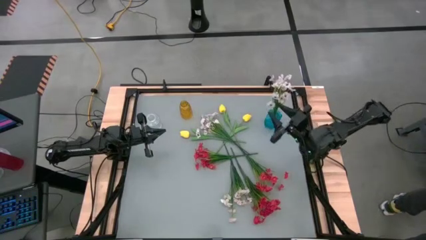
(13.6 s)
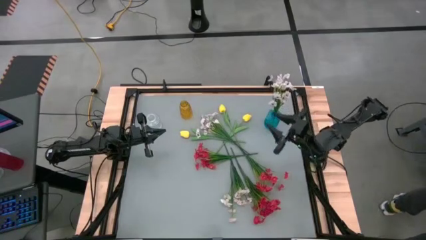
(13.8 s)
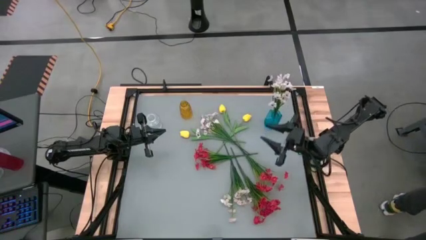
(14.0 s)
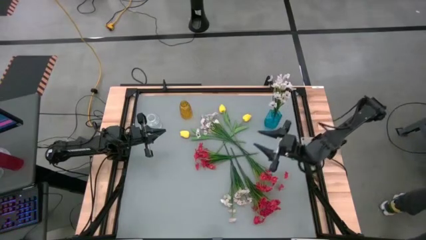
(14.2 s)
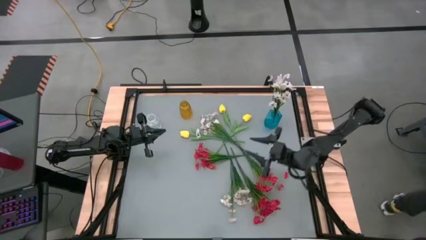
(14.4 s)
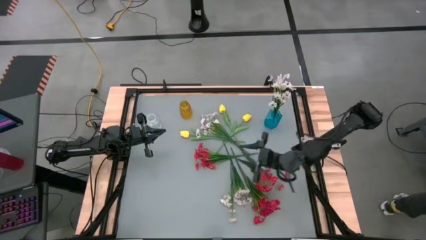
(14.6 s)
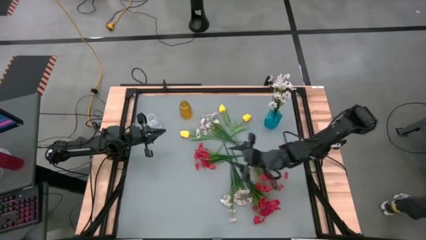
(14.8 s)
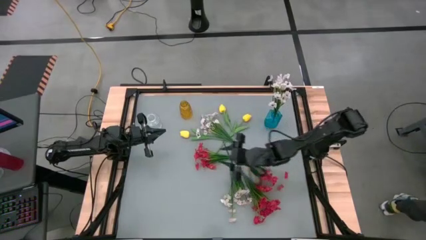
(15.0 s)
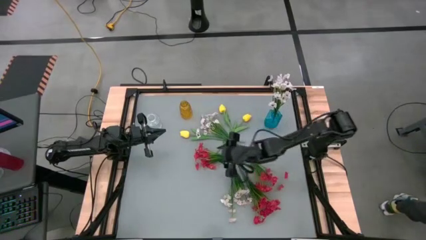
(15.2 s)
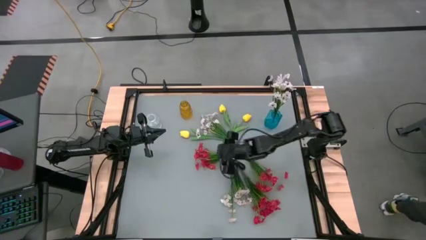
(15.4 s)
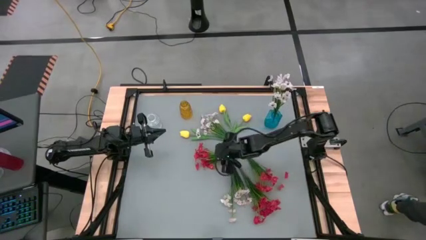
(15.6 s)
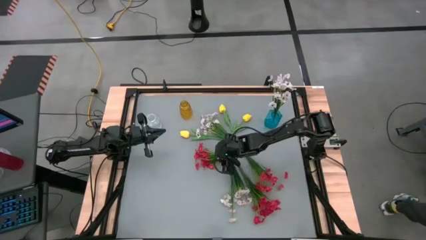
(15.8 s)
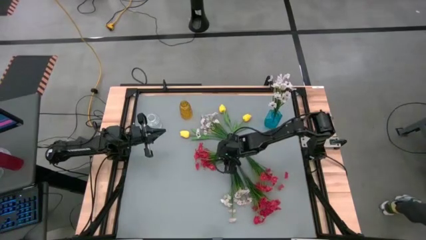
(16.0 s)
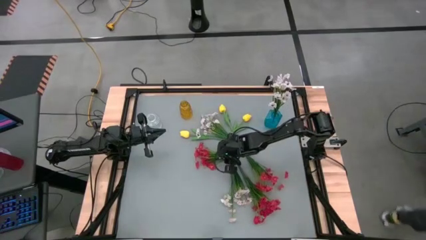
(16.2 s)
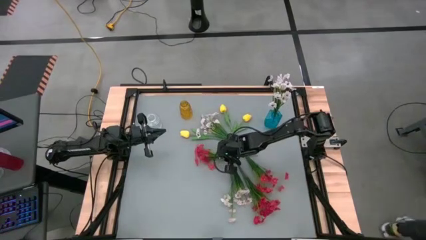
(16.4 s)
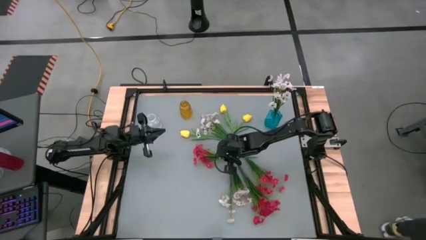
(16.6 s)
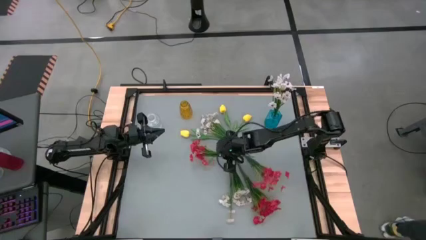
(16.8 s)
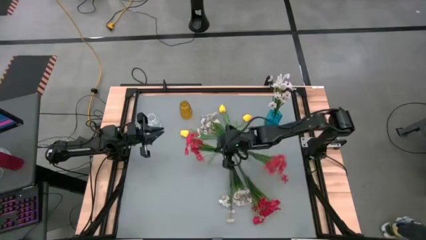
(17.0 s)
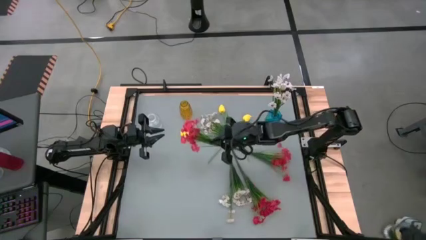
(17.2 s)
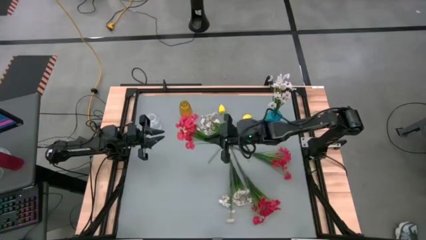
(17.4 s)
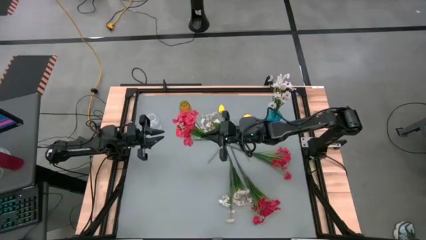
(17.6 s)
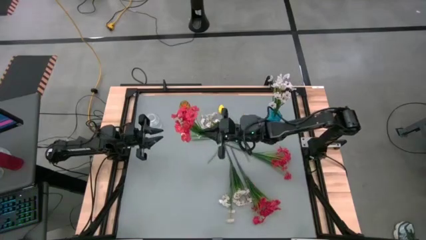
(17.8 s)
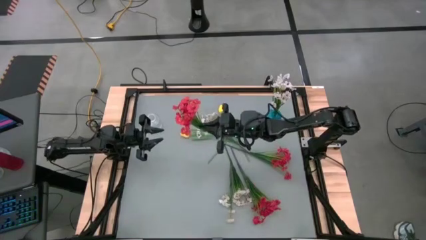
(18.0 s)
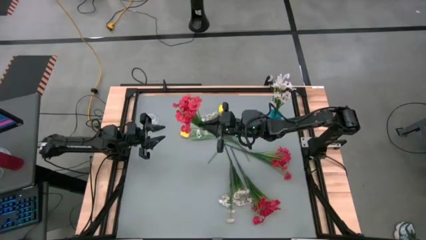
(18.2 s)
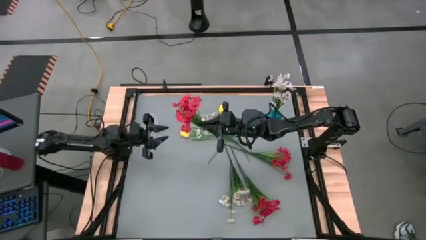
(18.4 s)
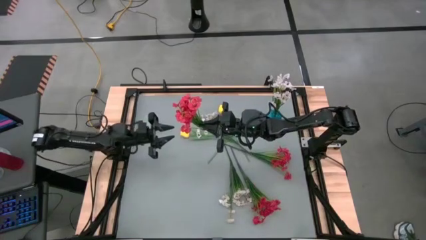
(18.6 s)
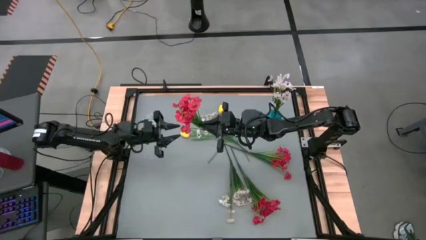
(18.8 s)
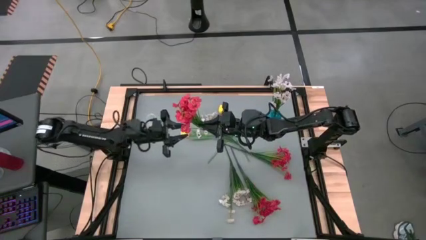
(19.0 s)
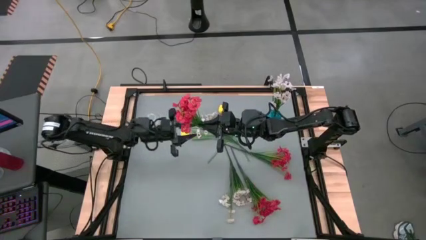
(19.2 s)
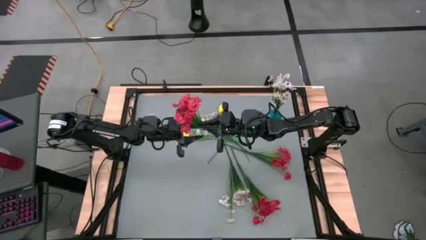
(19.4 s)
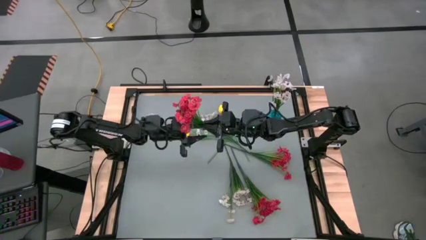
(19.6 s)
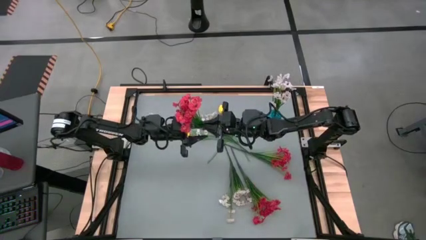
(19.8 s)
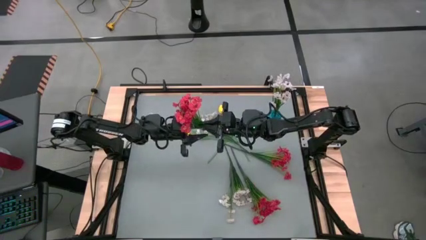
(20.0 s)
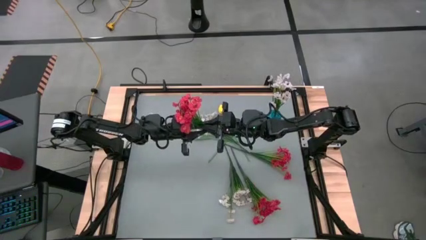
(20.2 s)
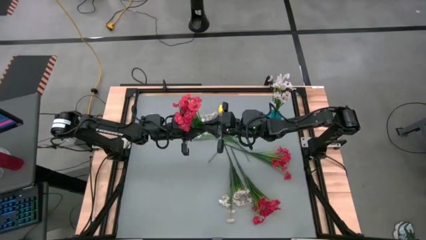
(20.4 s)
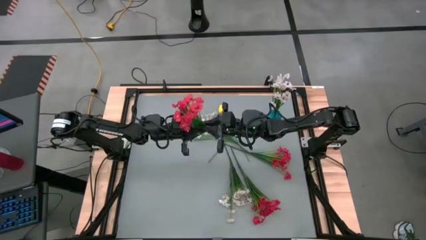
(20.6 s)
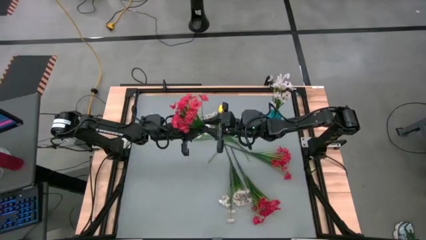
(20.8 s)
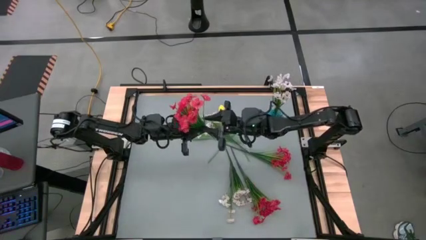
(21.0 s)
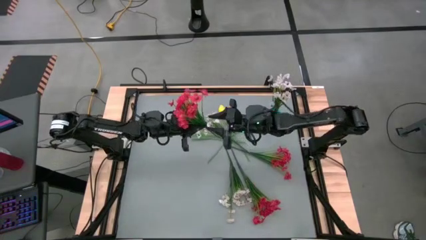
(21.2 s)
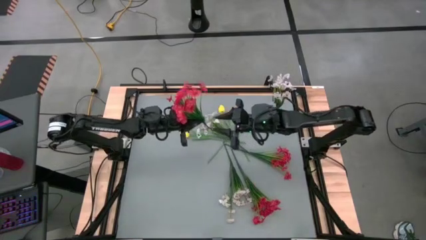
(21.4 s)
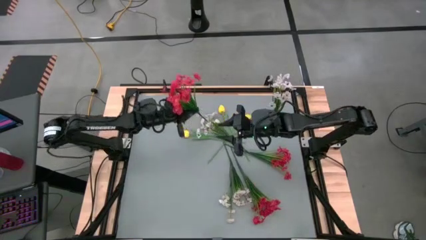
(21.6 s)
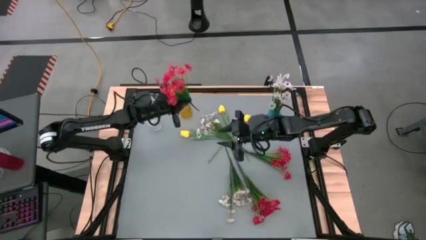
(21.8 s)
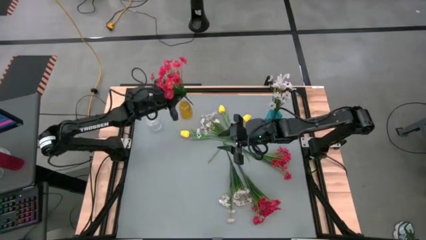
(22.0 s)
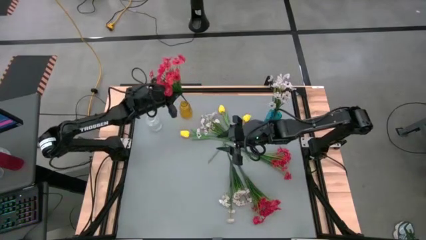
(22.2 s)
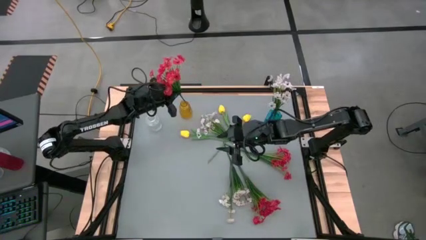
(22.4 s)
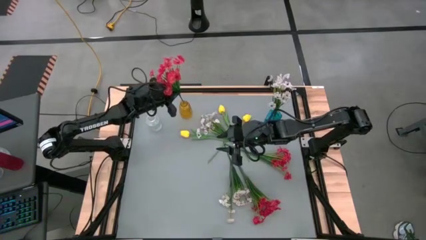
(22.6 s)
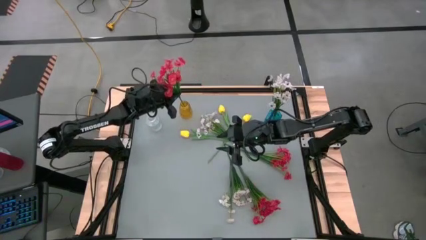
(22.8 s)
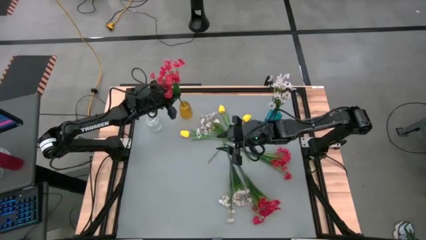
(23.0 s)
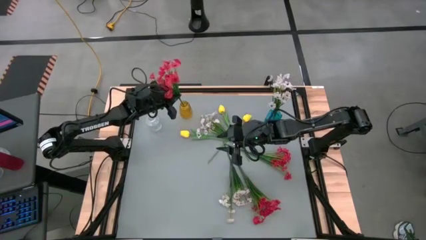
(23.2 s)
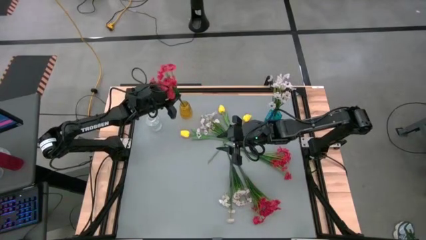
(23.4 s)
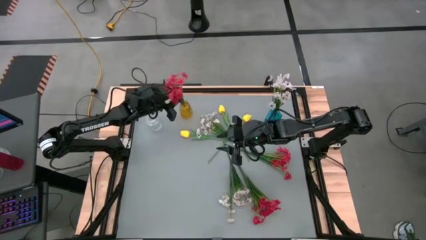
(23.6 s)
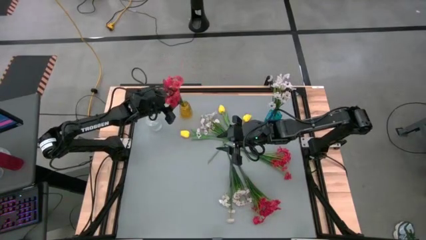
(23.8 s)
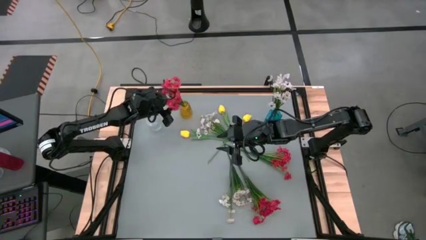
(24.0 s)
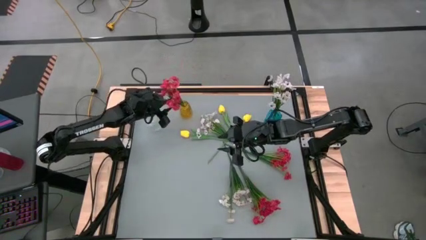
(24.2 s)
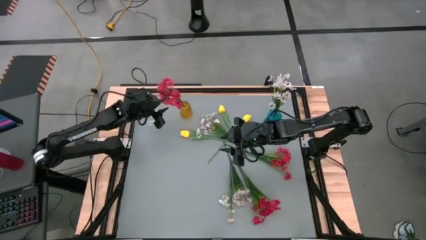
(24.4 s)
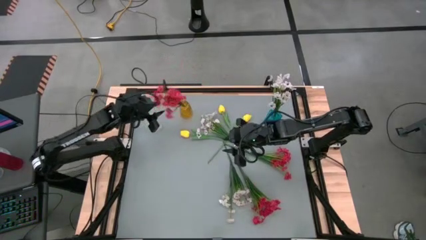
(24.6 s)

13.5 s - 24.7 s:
Task: Sort flowers into vase by color
Put the top red flowers into the yellow vase

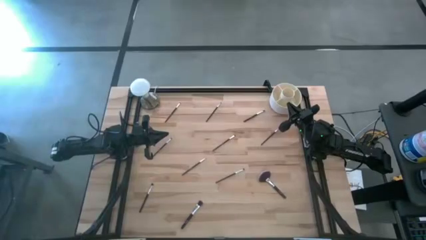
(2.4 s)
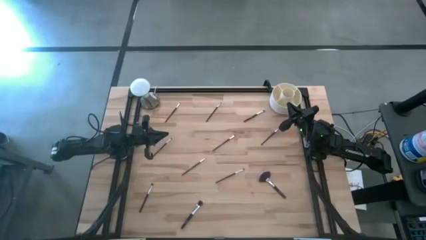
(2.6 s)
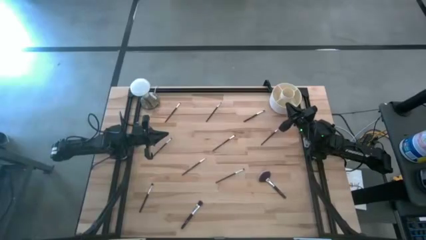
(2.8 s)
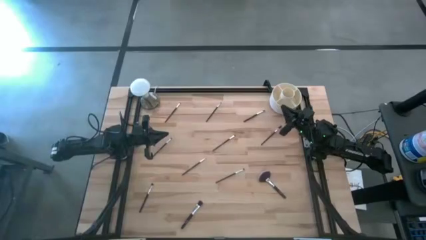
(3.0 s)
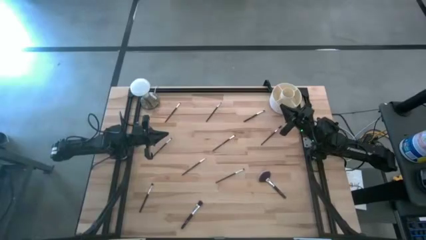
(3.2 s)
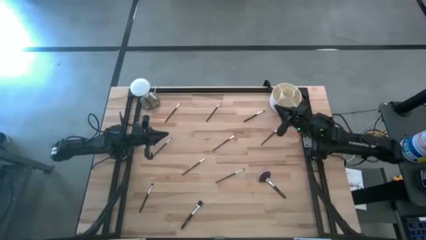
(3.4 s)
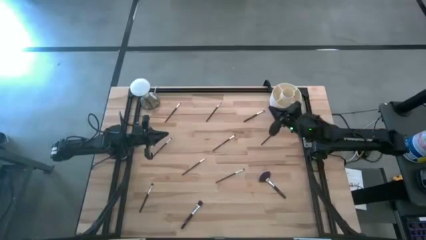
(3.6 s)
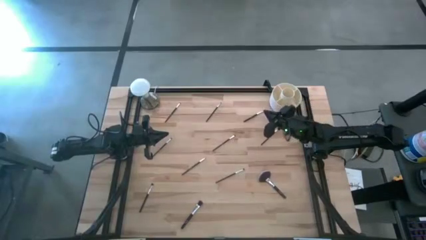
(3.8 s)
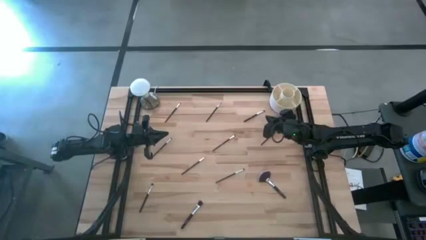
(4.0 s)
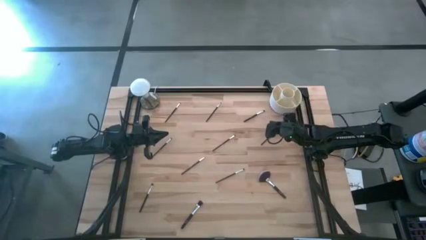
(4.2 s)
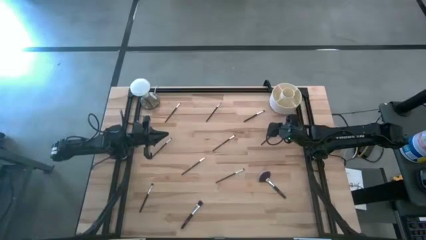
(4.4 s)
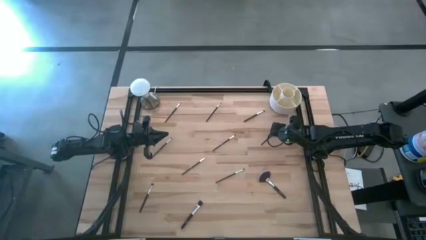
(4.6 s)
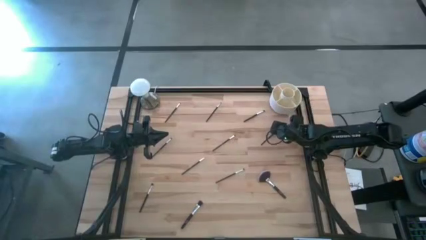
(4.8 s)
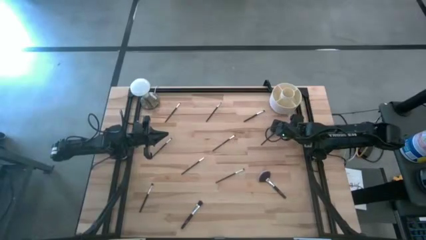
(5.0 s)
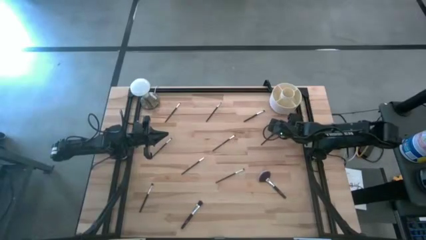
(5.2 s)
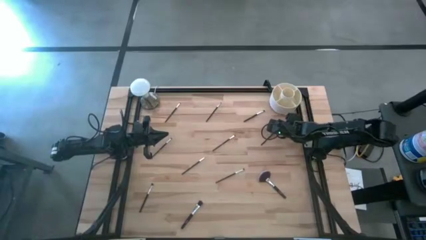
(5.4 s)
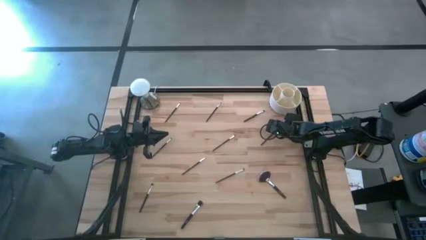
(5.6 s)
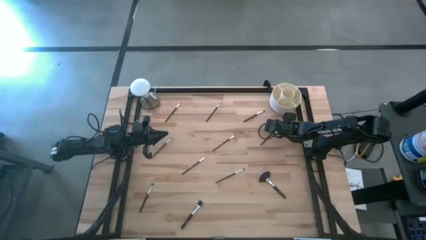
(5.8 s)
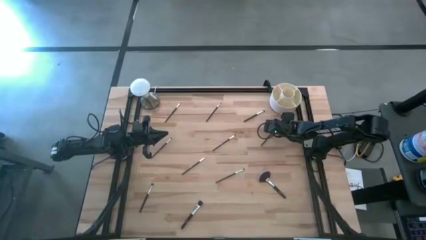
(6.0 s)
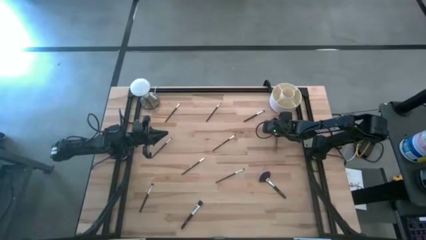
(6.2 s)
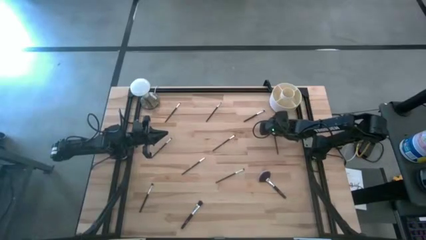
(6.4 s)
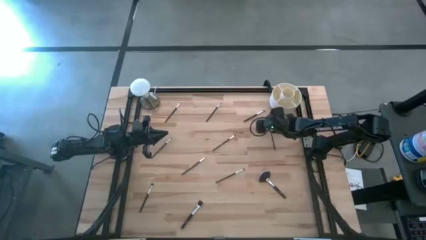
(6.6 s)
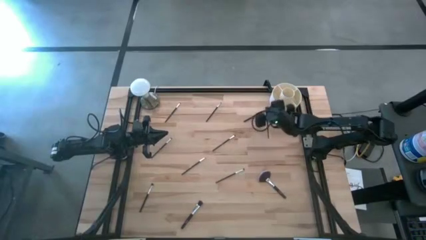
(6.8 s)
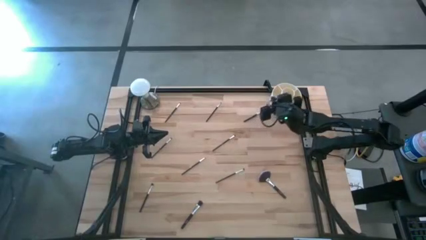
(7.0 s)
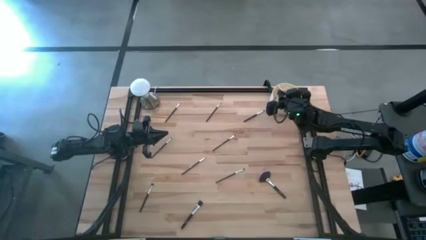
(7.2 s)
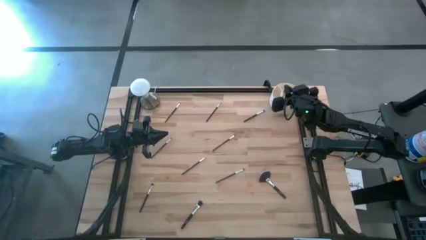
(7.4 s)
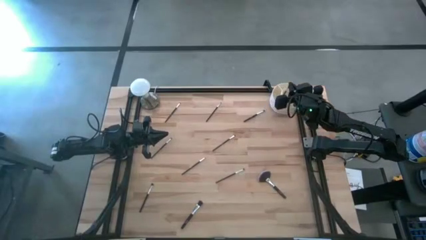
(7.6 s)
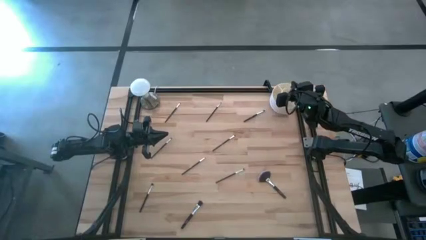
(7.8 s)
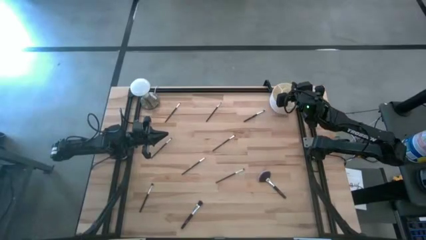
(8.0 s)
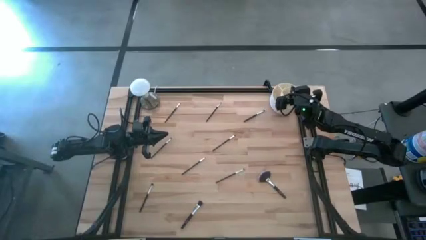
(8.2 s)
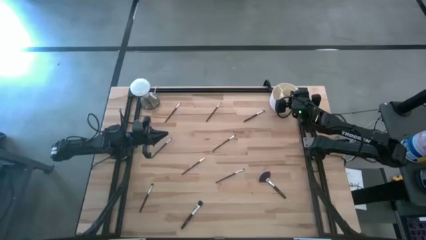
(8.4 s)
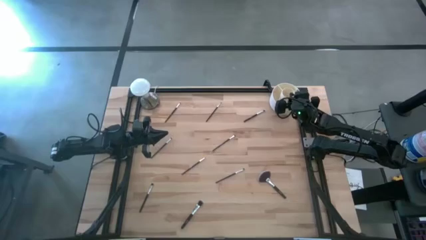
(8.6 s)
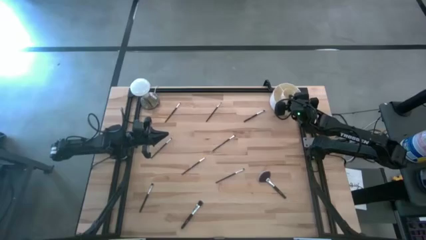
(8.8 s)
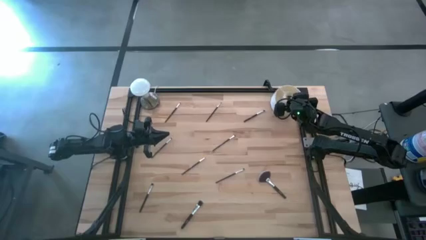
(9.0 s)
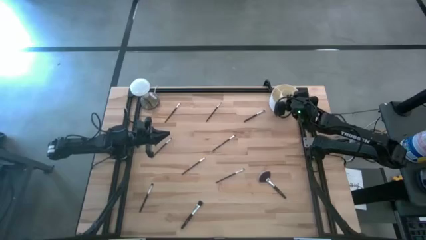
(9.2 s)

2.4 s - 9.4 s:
Task: Put items in baskets/containers
Put the black brow brush into the white organizer
